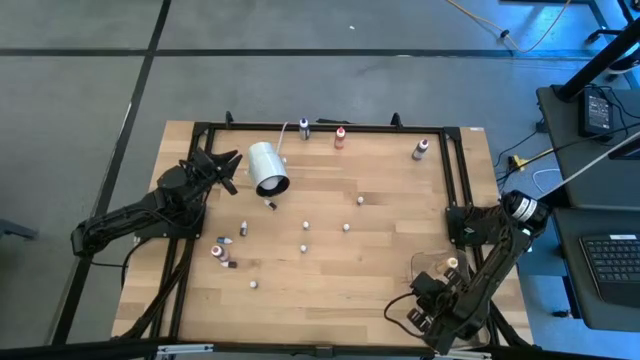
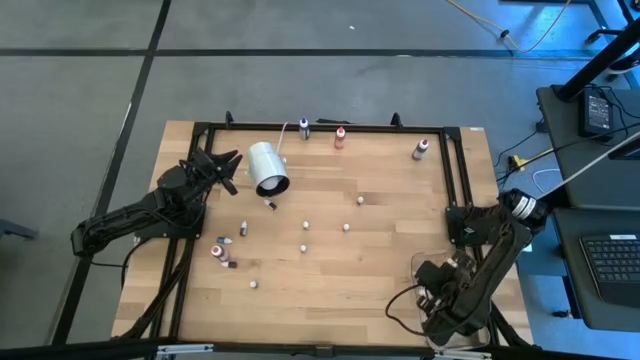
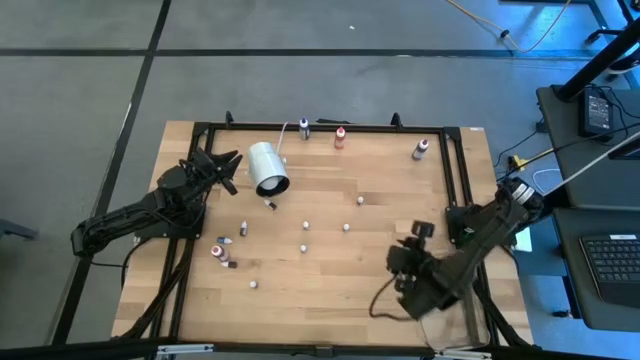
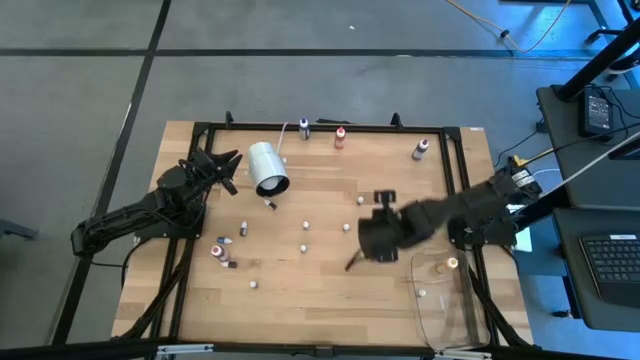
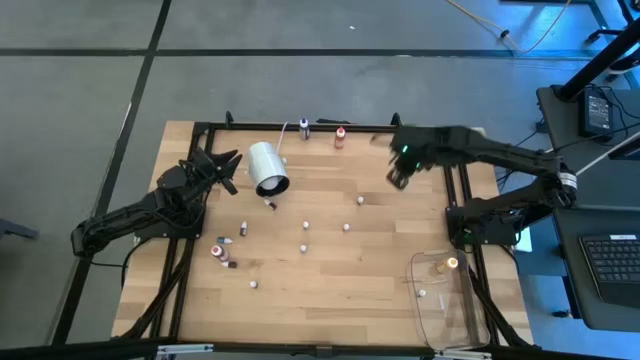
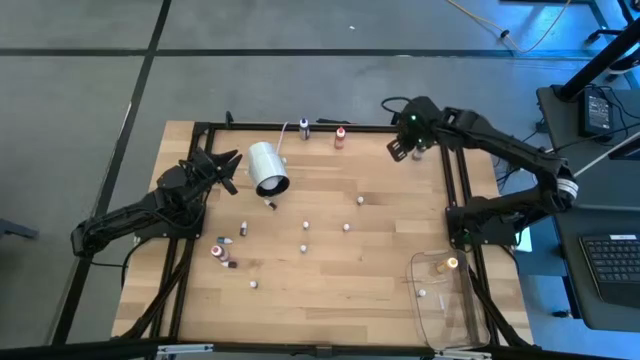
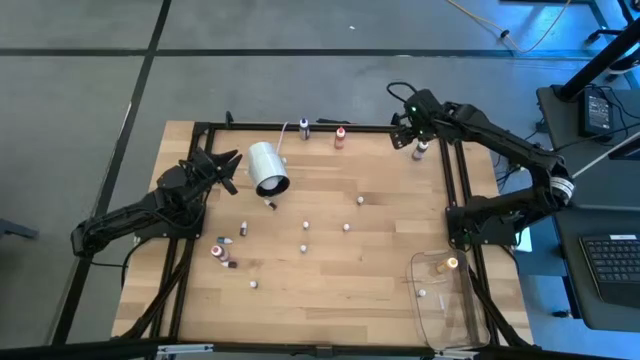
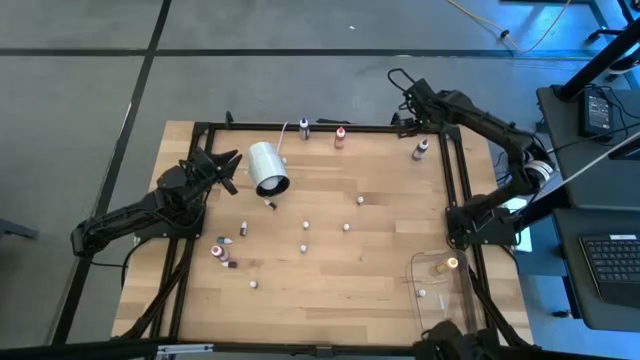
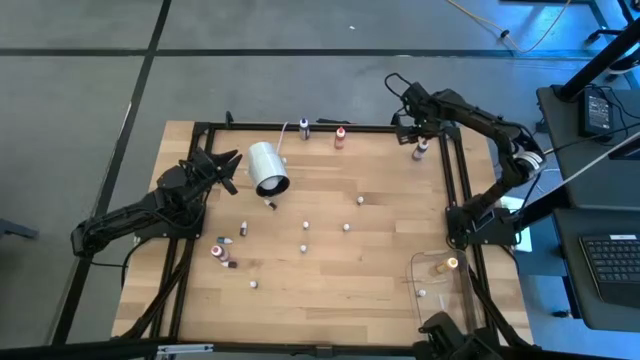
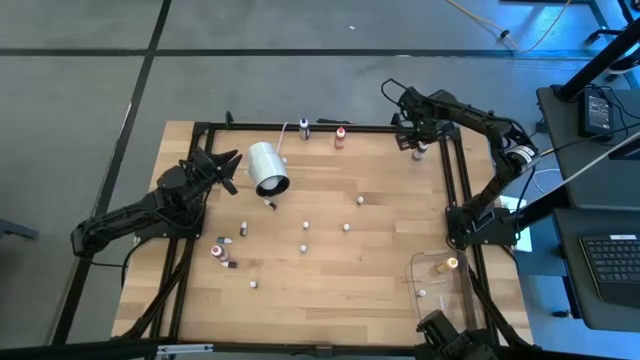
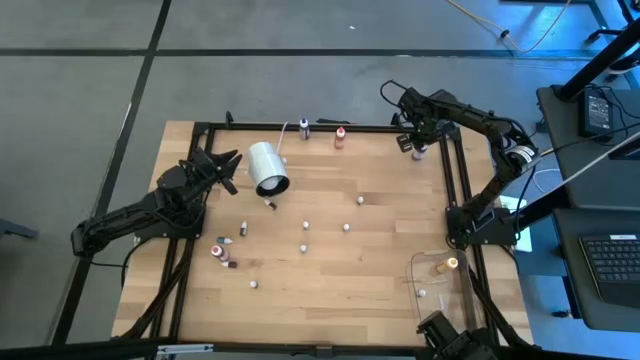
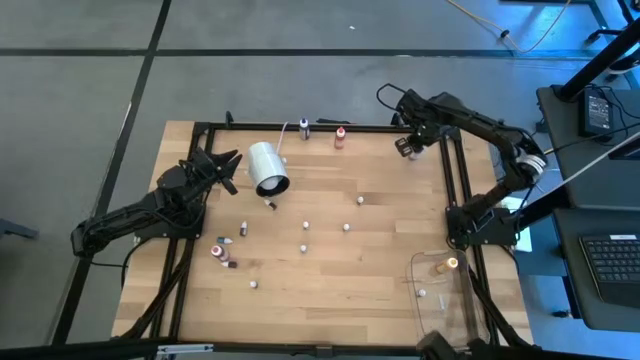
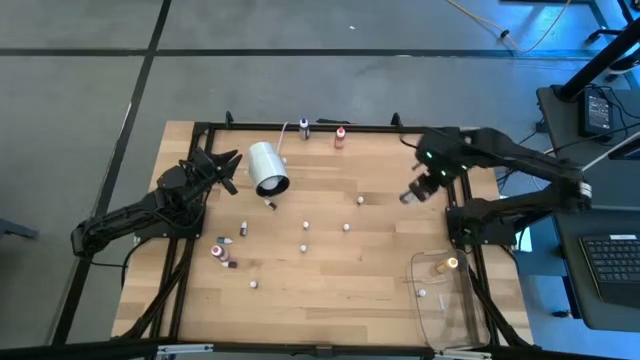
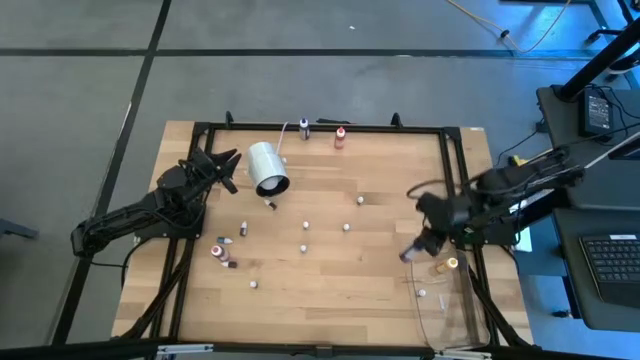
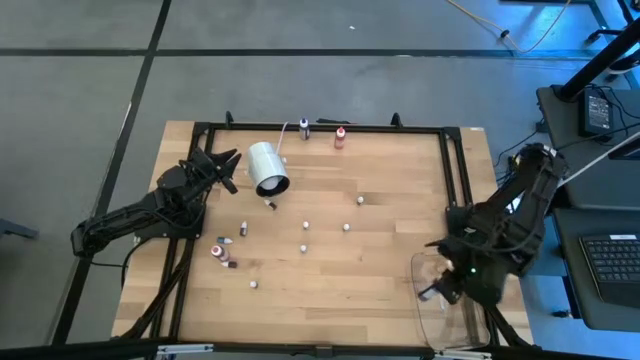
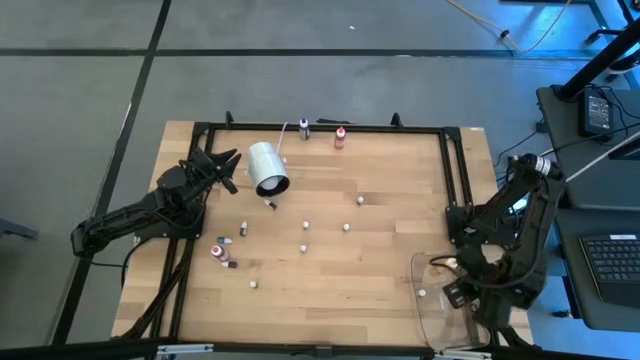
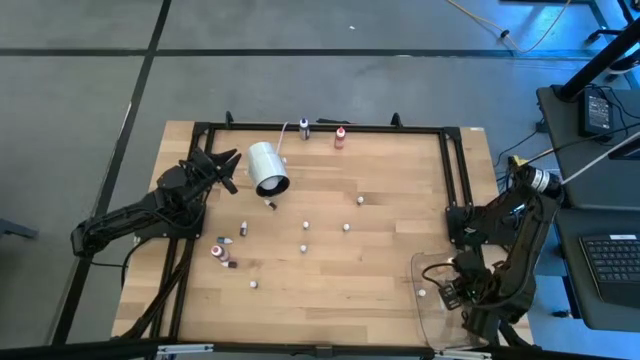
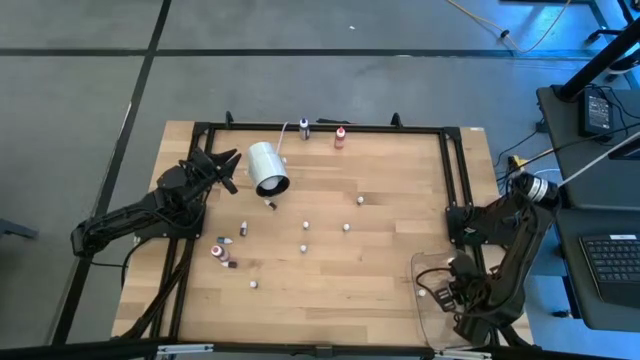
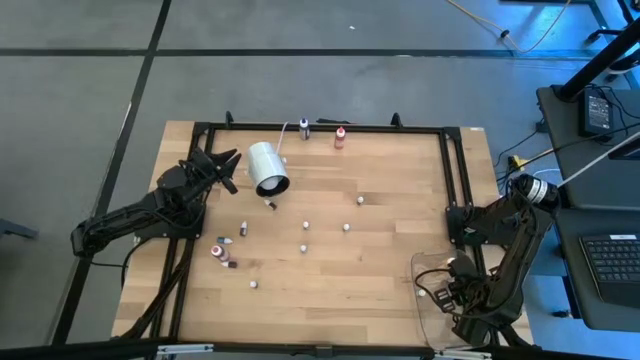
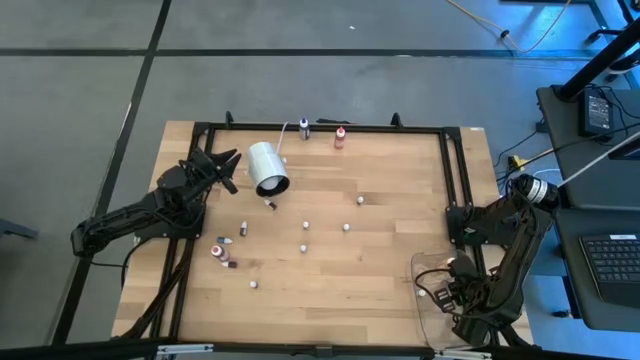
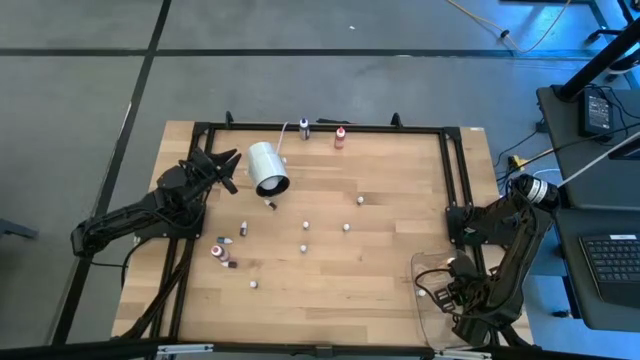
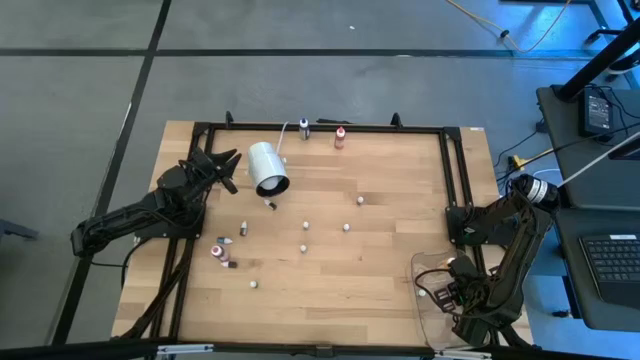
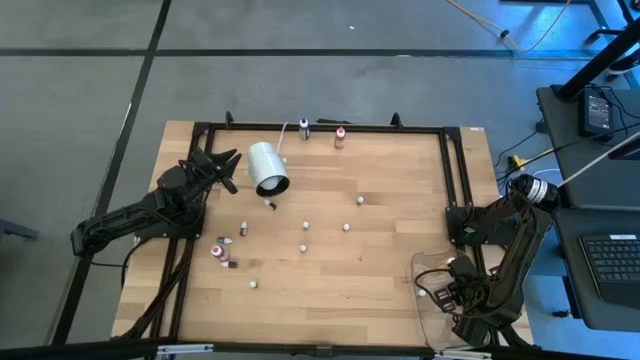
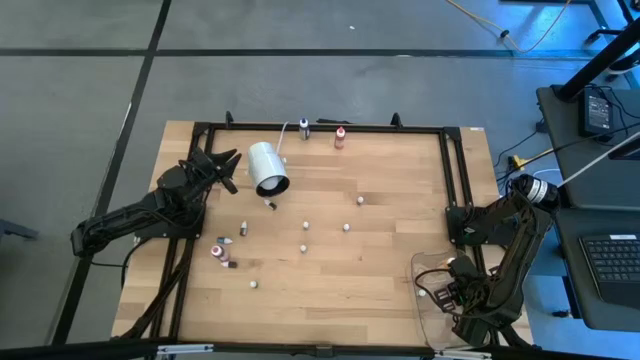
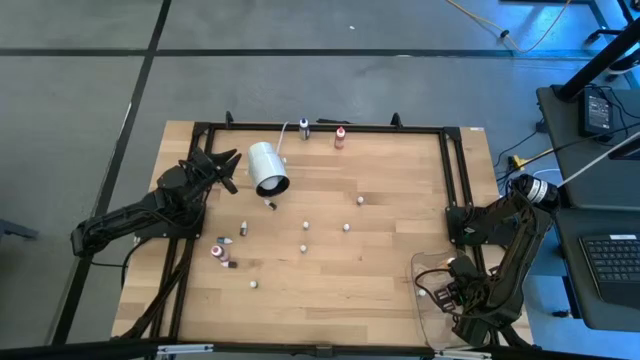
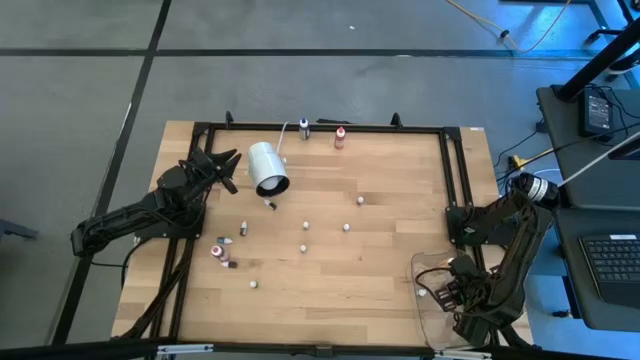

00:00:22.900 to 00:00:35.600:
Task: Pick & Place food coloring
Put the large purple food coloring bottle into the transparent bin

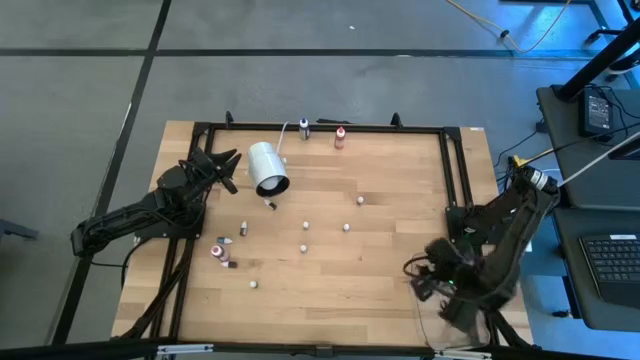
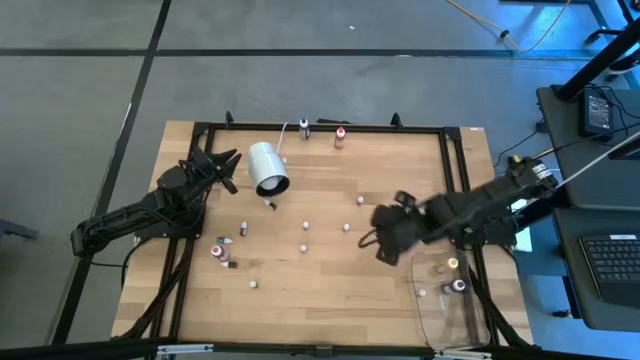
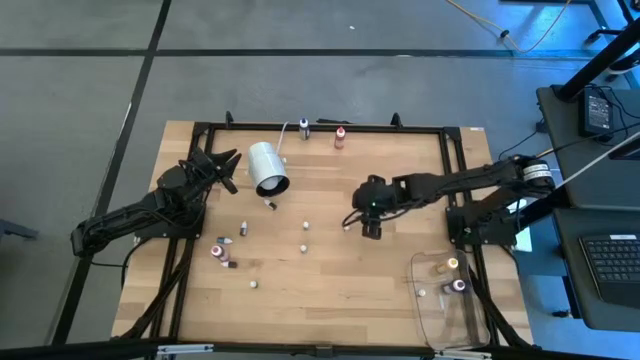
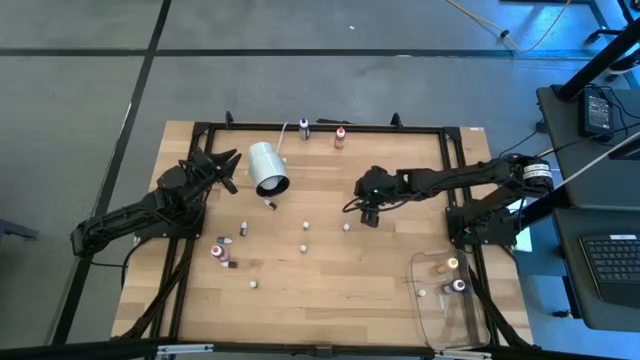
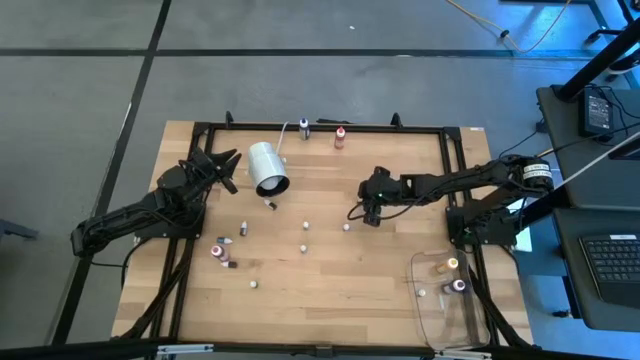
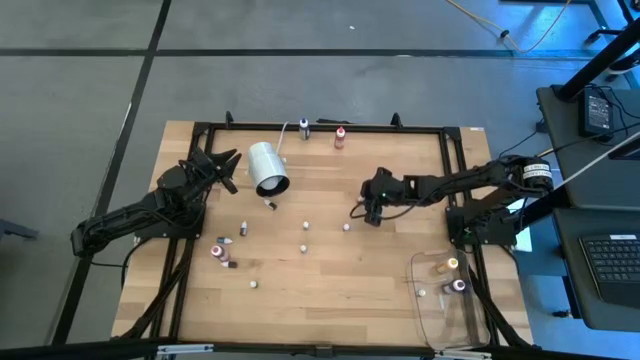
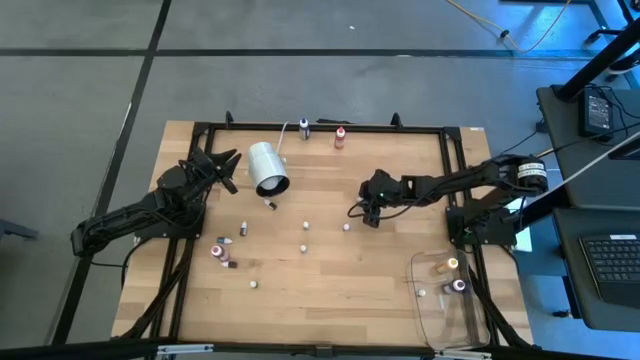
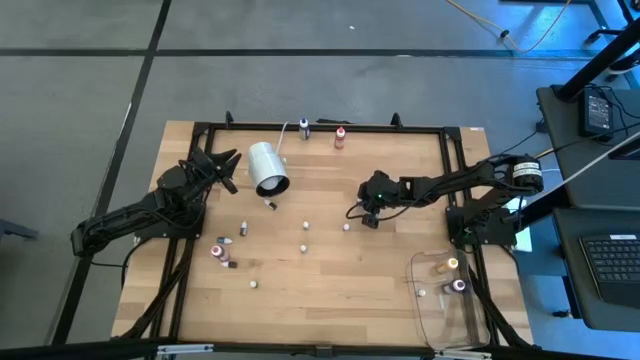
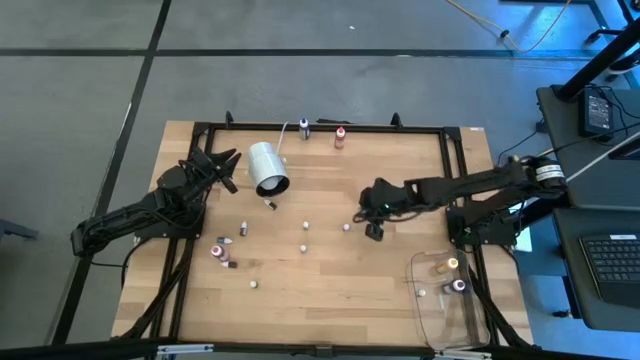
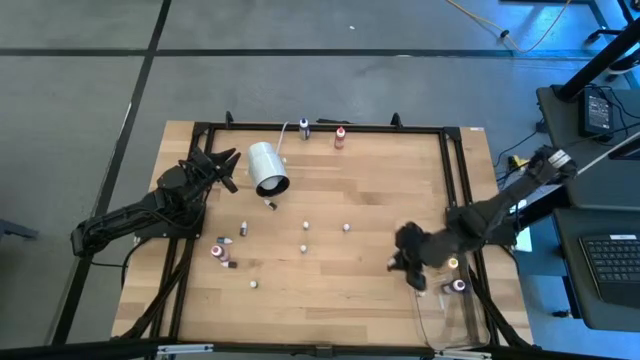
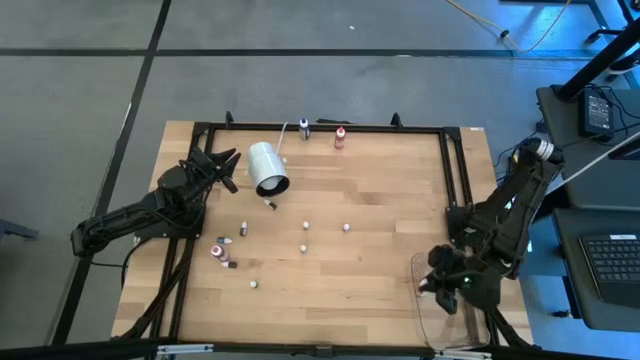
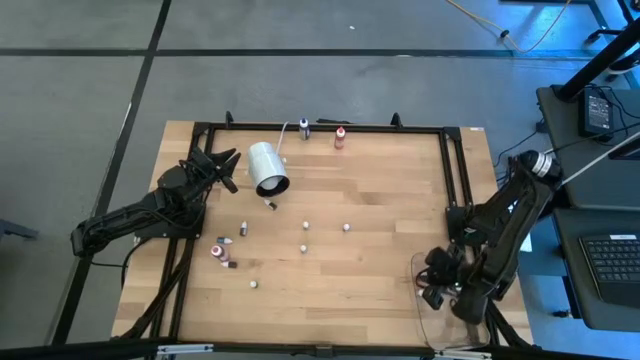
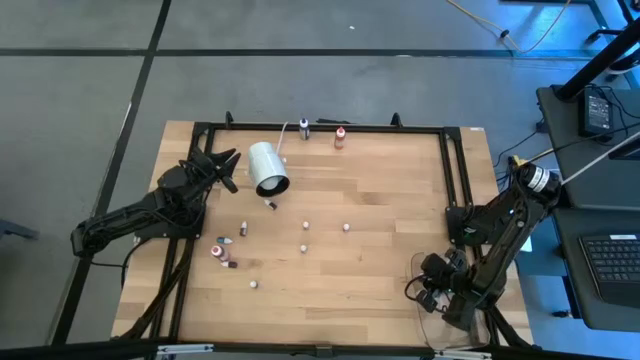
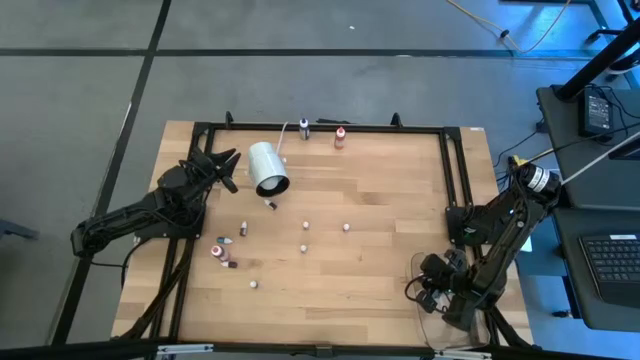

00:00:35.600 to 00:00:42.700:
Put the small red food coloring bottle into the transparent bin

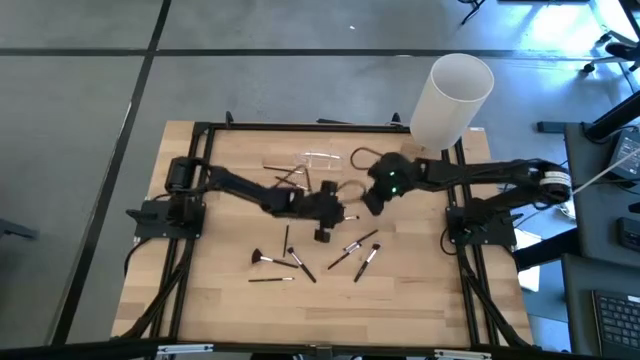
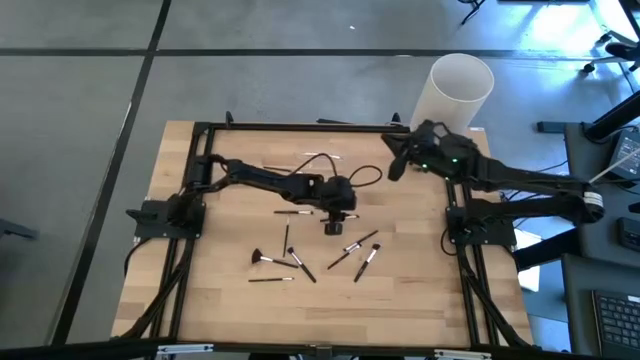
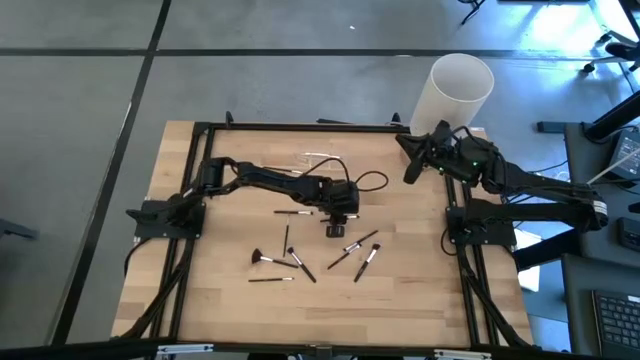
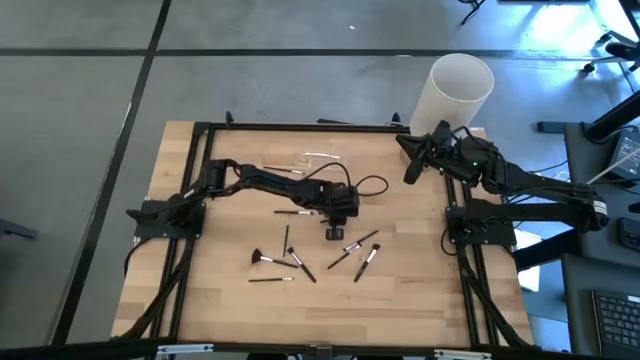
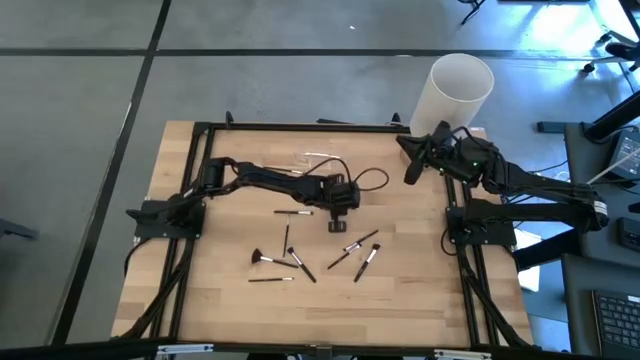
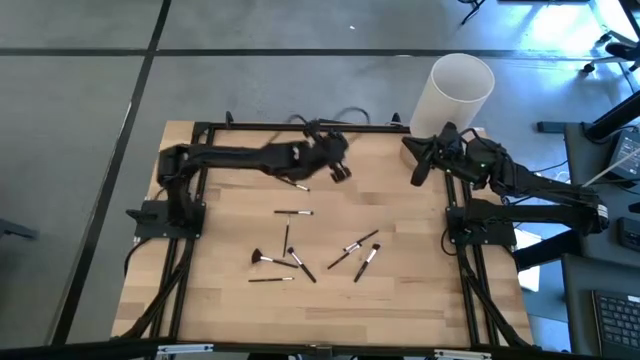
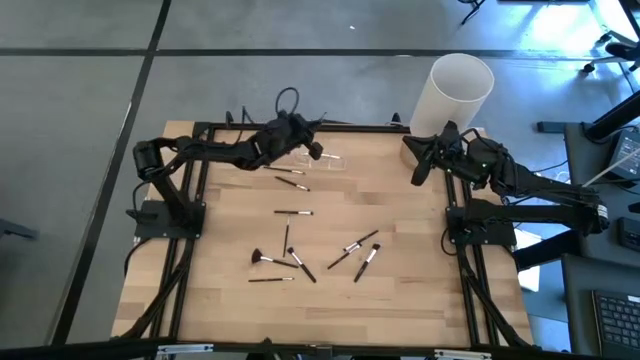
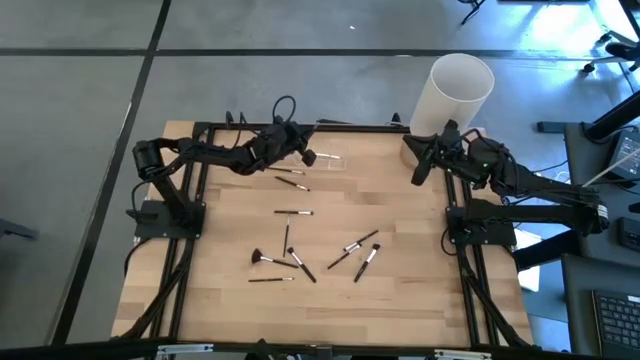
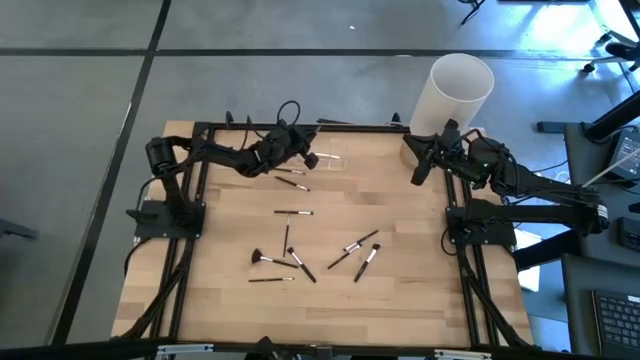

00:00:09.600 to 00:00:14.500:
Task: Pick & Place Makeup Brushes
Put the eyeshadow brush into the transparent organizer
